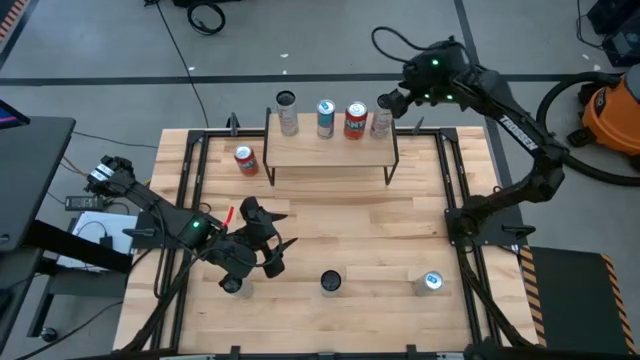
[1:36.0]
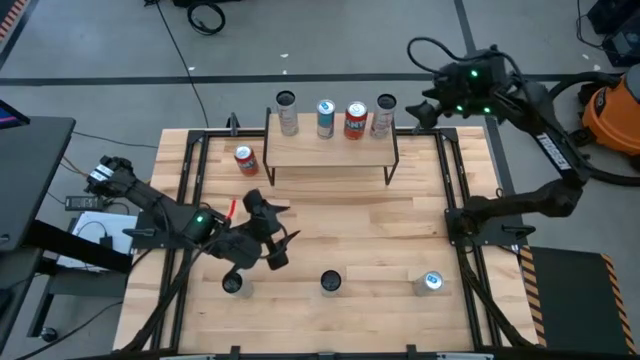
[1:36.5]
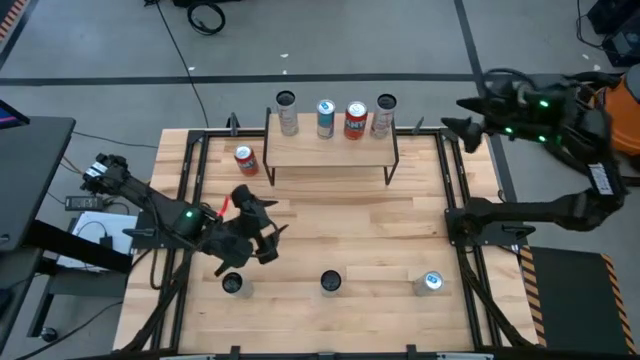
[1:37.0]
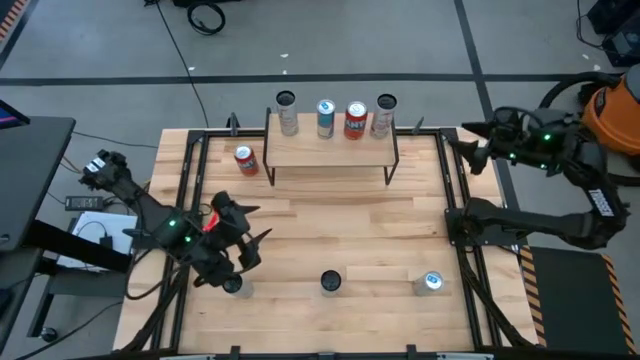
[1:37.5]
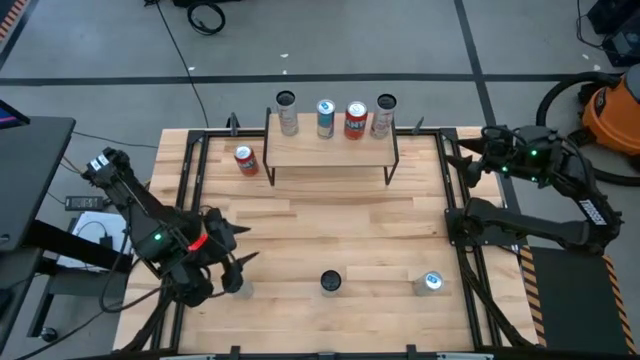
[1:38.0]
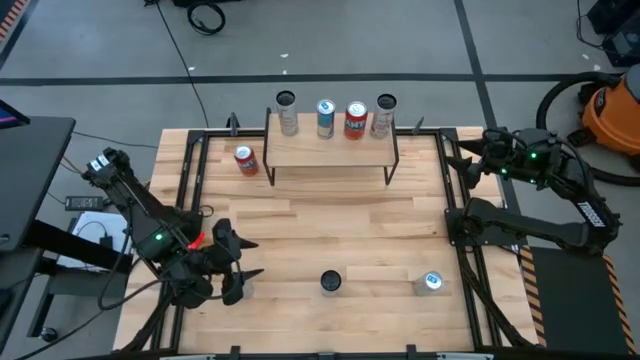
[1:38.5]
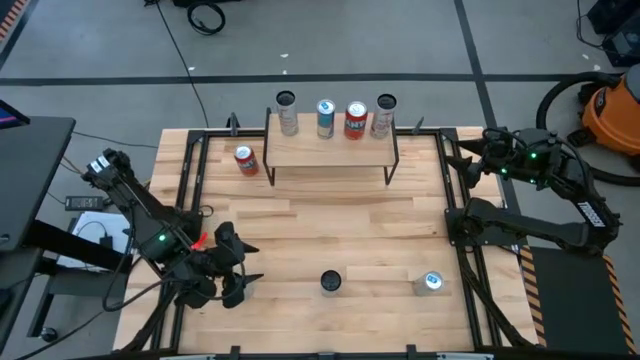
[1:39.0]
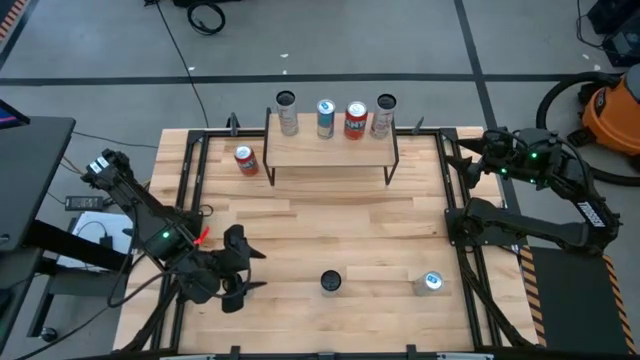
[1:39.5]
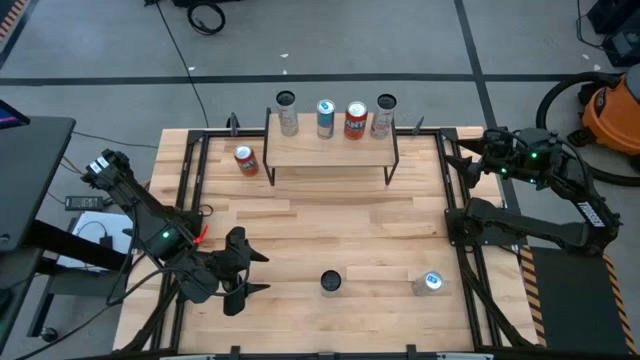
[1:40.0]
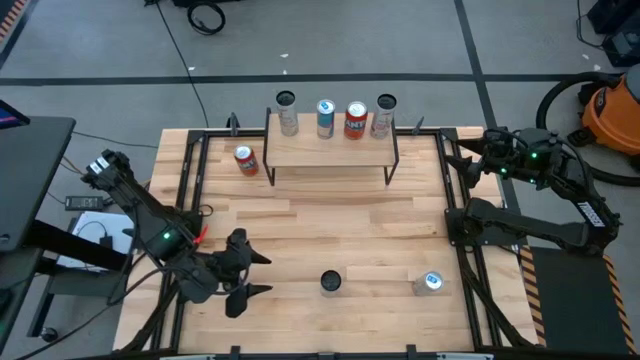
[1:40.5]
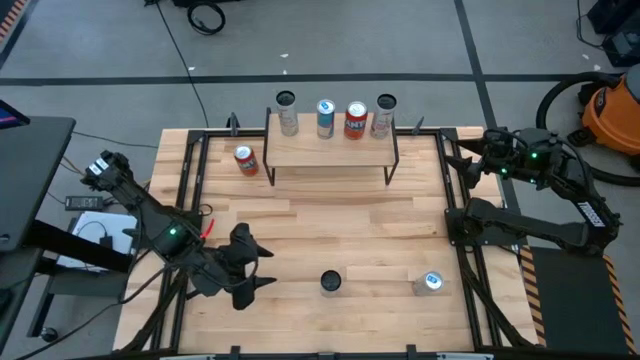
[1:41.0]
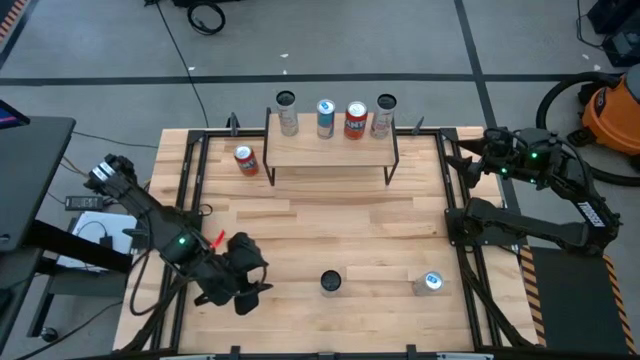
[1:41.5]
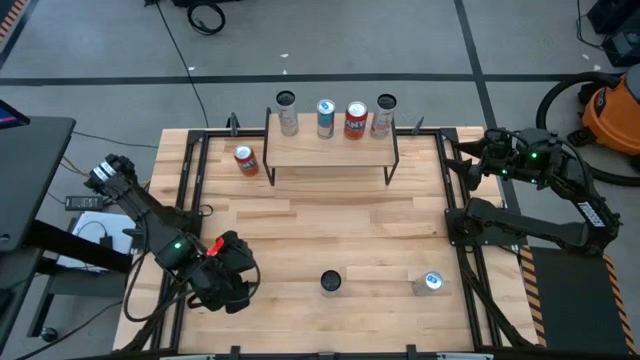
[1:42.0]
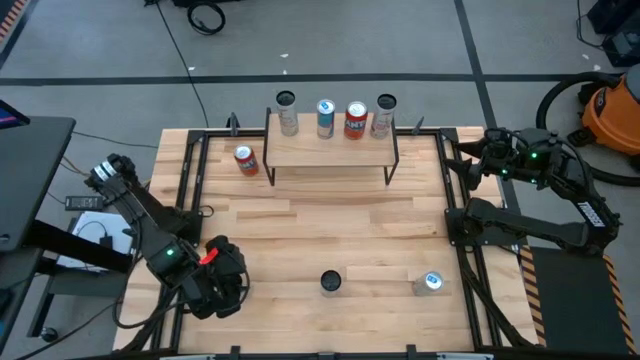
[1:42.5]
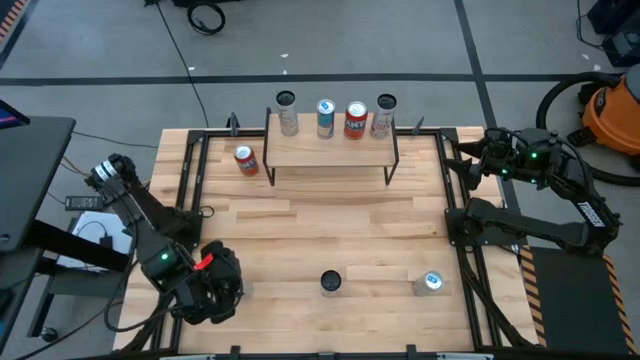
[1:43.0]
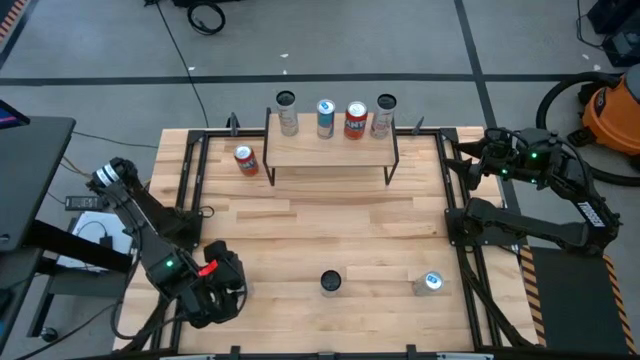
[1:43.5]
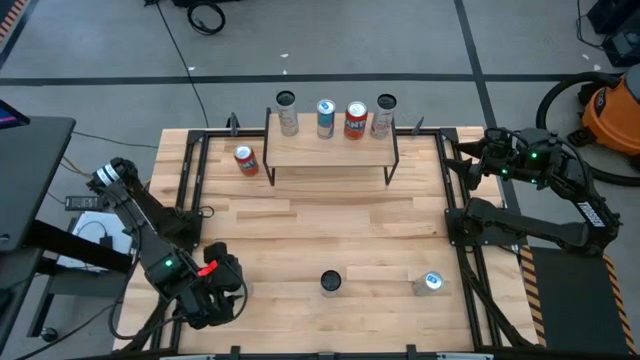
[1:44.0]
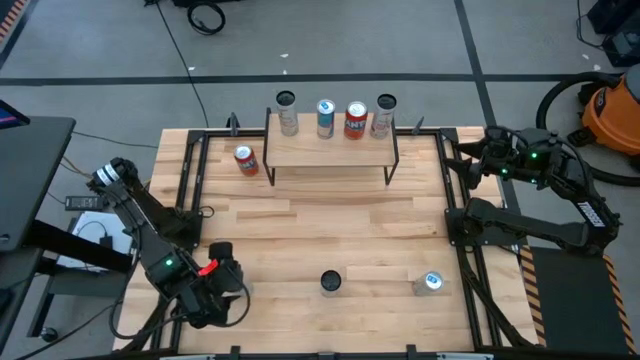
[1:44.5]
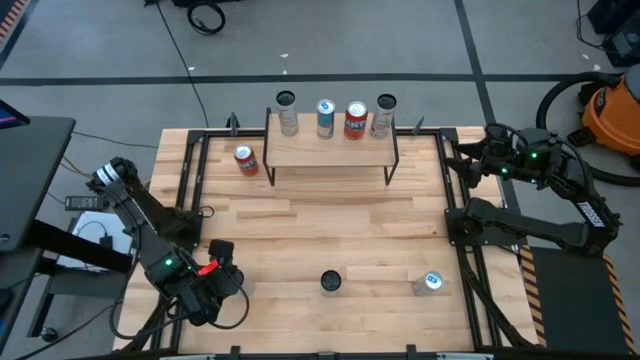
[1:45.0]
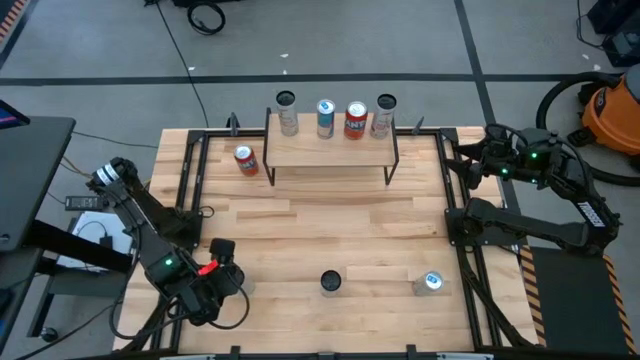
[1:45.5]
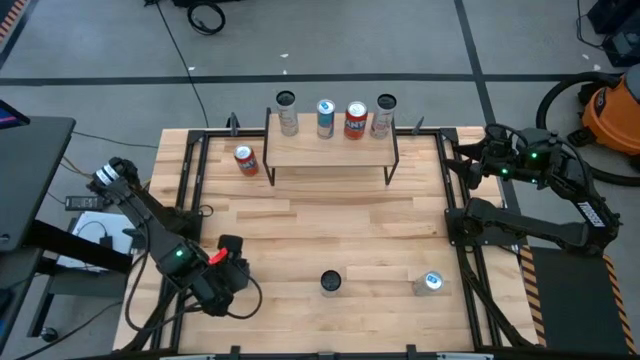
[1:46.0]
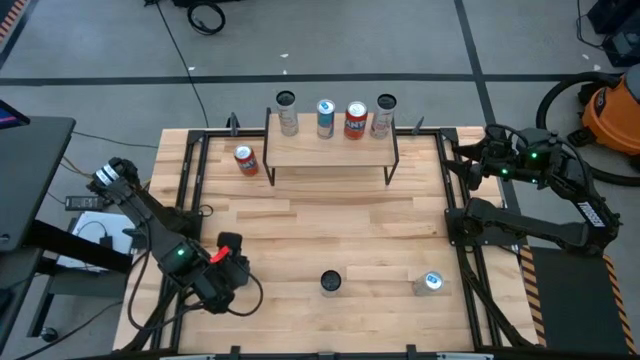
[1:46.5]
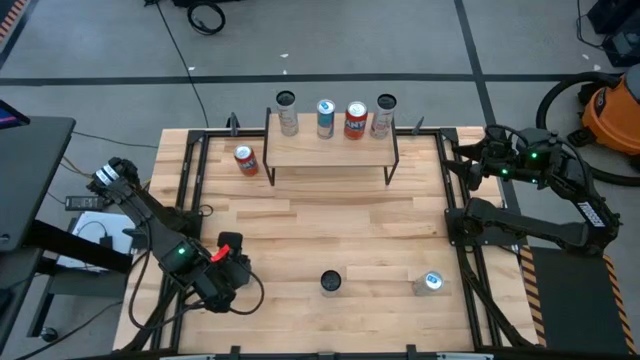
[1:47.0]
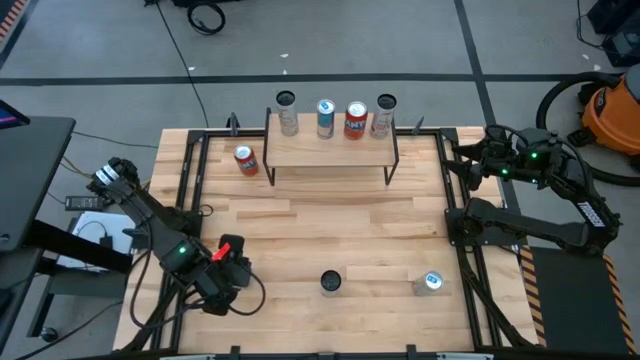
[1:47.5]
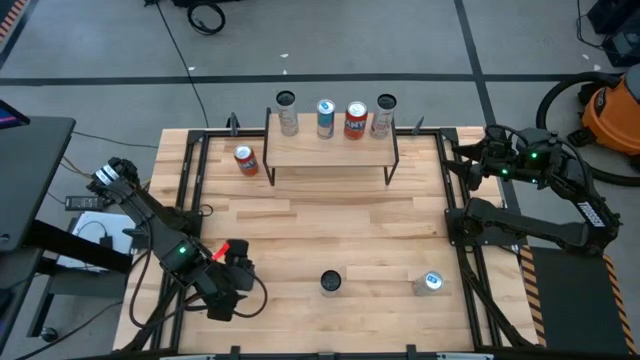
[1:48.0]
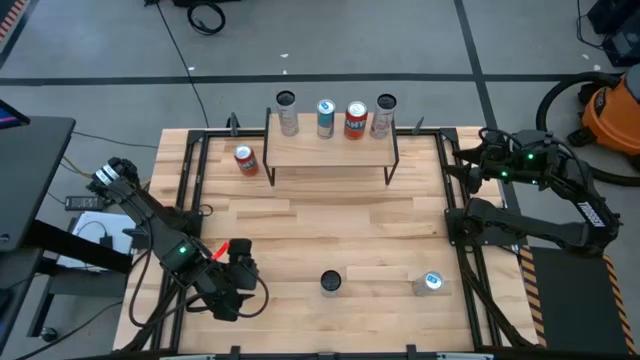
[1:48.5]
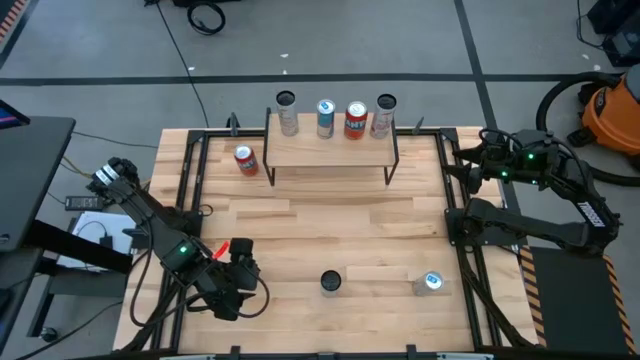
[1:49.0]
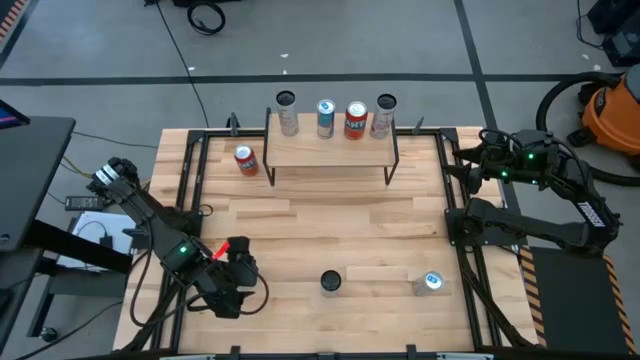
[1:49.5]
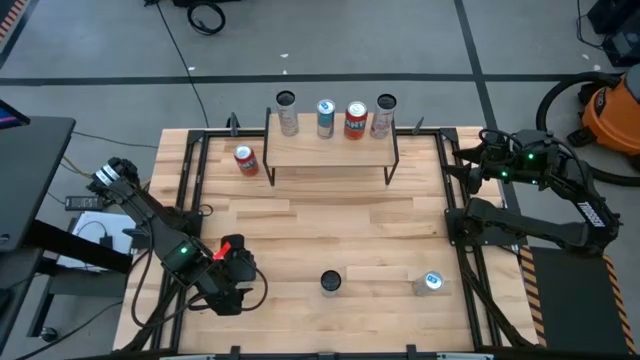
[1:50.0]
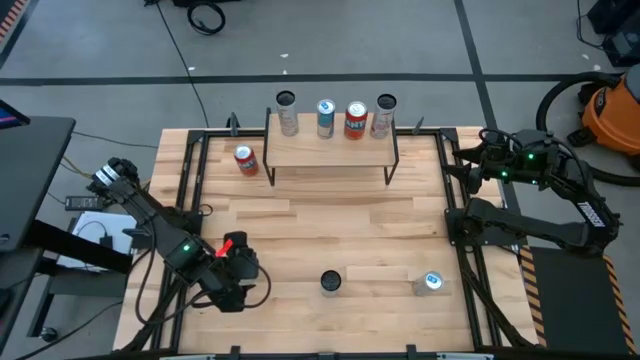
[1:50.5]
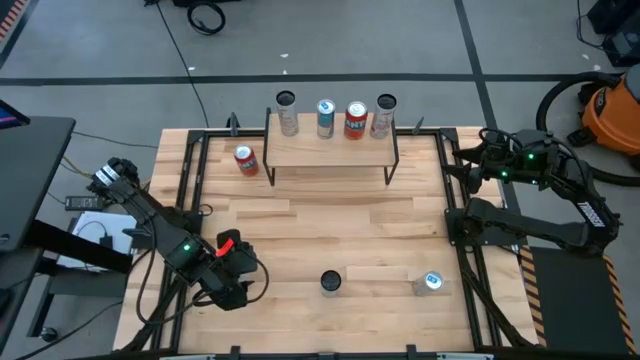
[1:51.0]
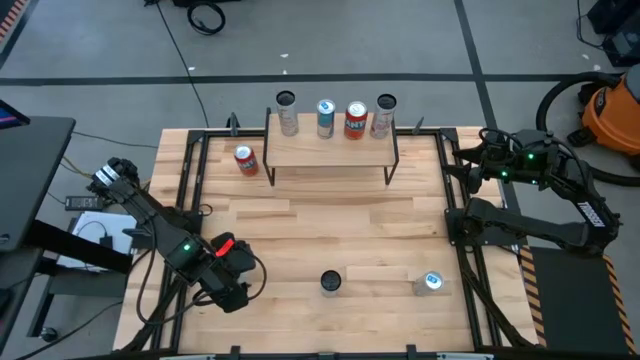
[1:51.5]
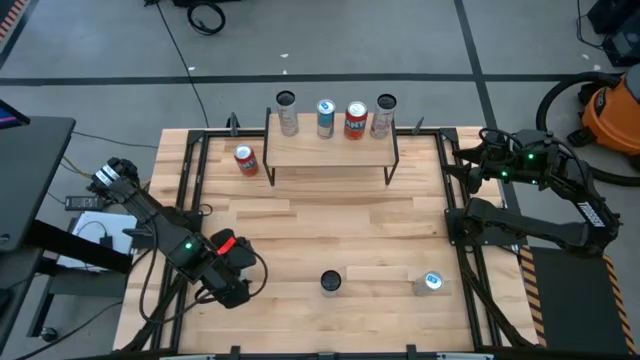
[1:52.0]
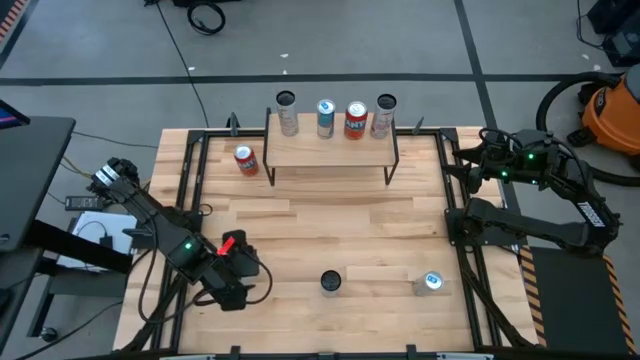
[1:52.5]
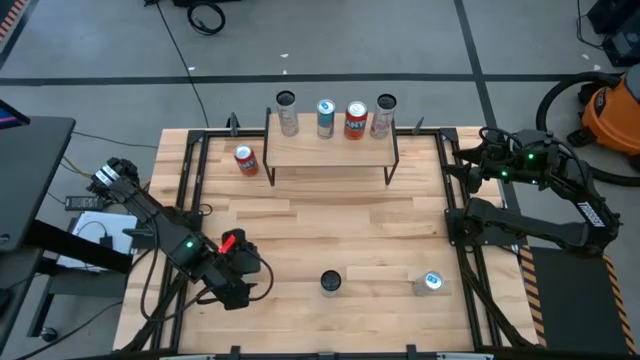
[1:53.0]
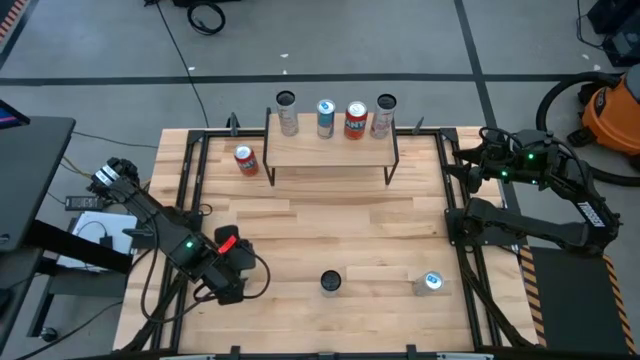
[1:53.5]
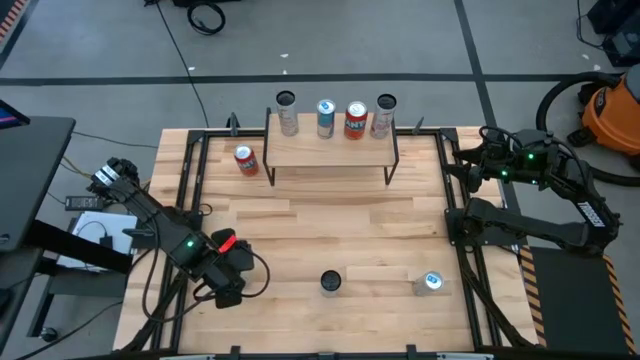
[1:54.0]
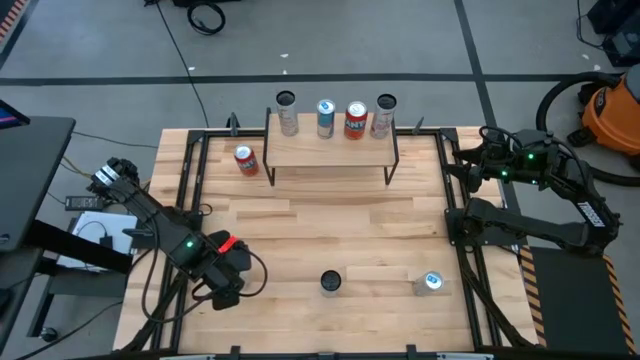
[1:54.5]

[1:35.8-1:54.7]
Task: Place canned beverage on shelf
Put the white yellow soda can on the shelf aligned with the other white yellow soda can

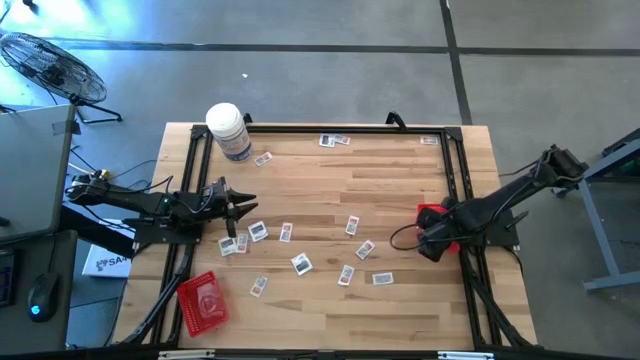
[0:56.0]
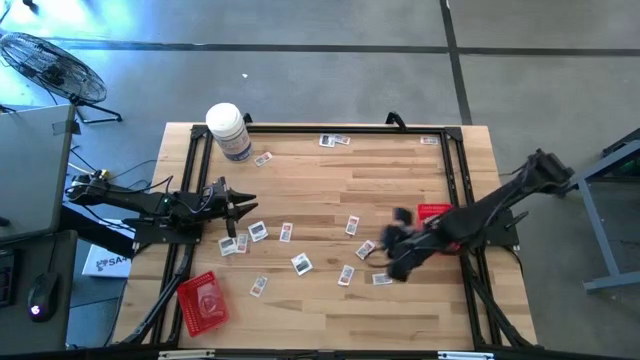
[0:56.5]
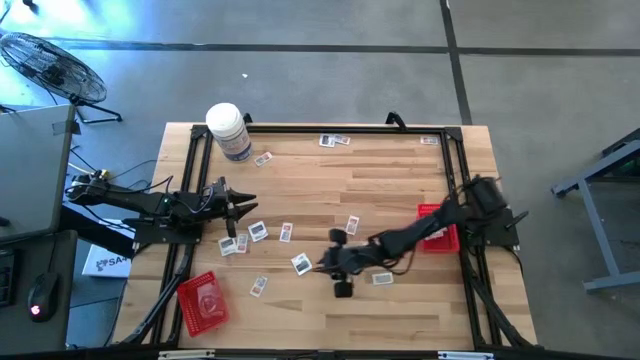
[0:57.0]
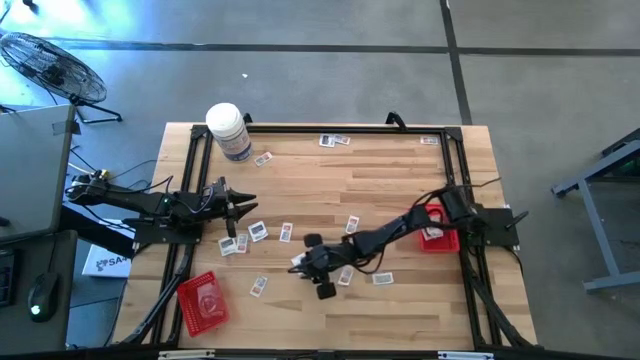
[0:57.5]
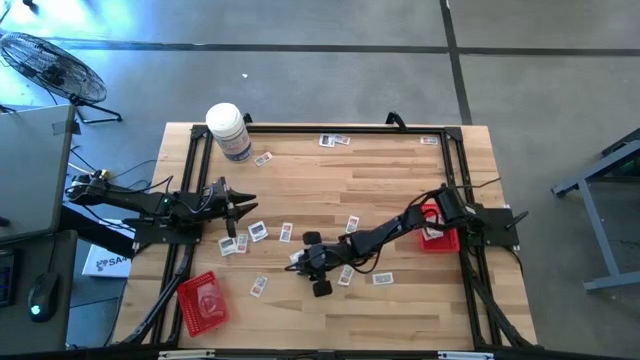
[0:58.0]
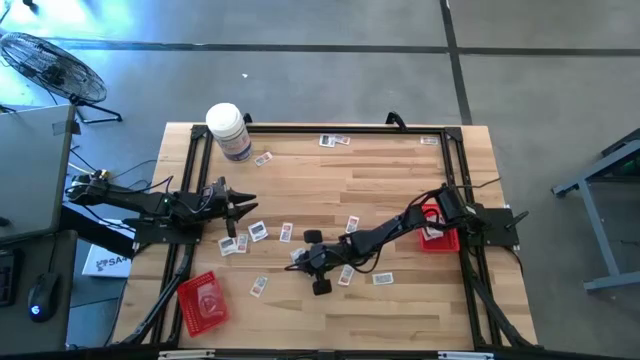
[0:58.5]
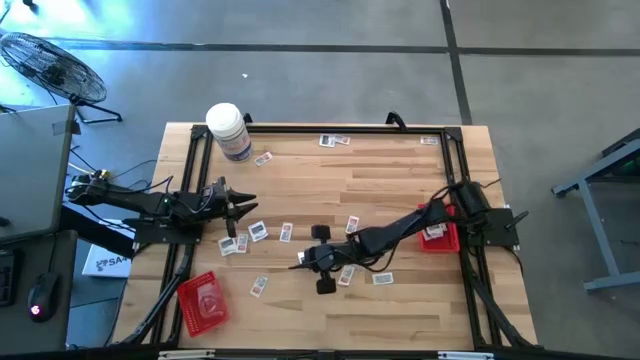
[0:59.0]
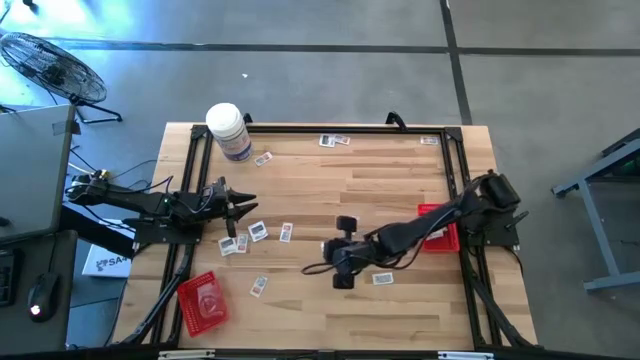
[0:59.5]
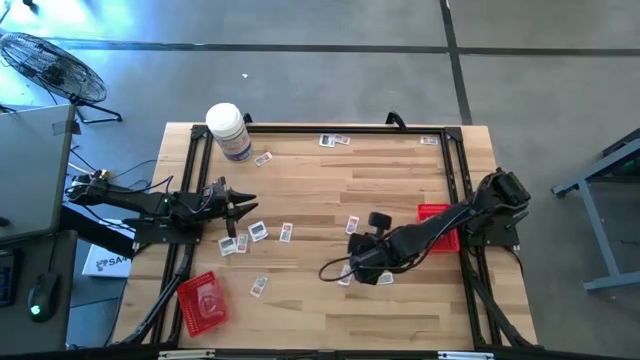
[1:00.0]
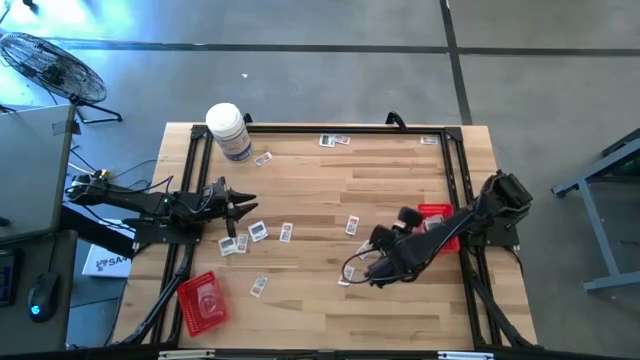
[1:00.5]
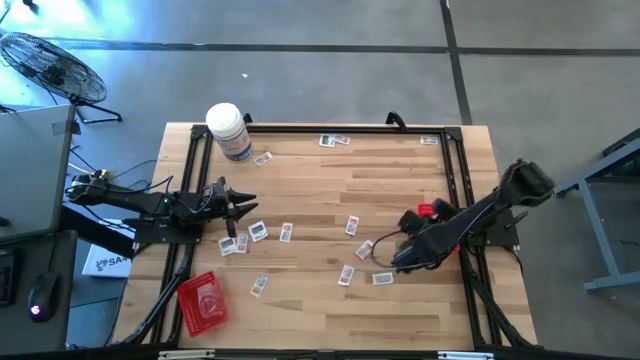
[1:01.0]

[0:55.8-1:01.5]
Task: Pick & Place First Aid Supplies
Put the towelette pack into the right red bin
